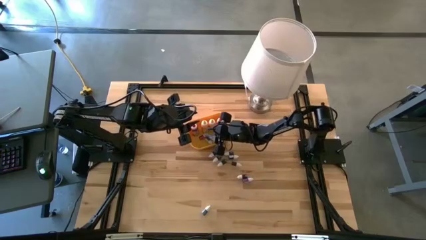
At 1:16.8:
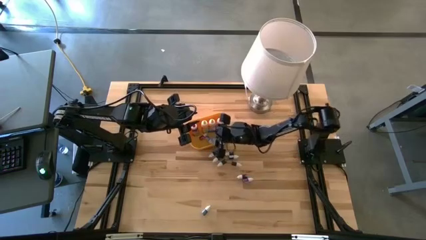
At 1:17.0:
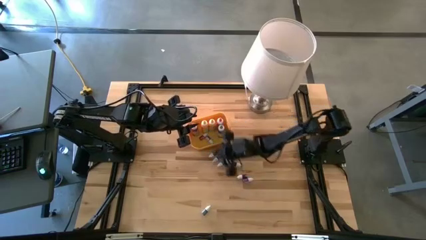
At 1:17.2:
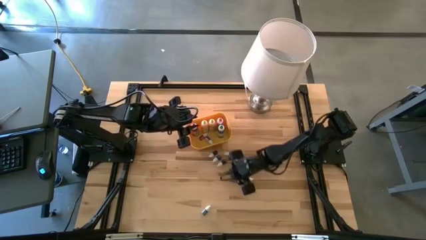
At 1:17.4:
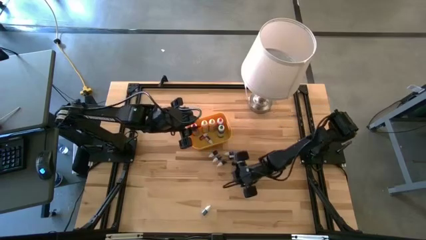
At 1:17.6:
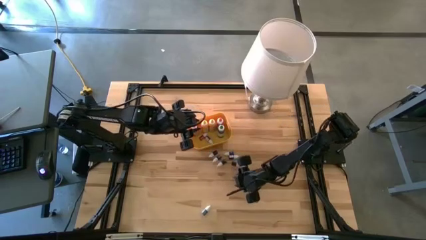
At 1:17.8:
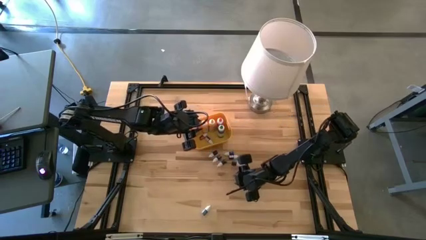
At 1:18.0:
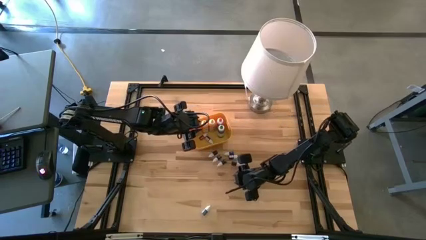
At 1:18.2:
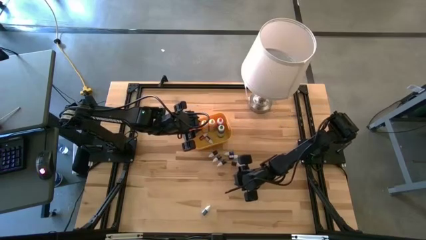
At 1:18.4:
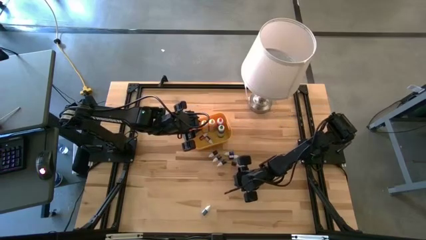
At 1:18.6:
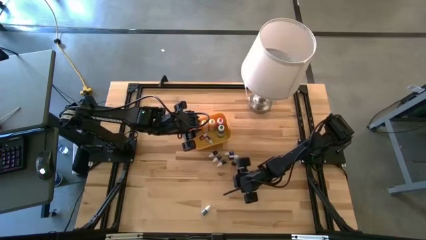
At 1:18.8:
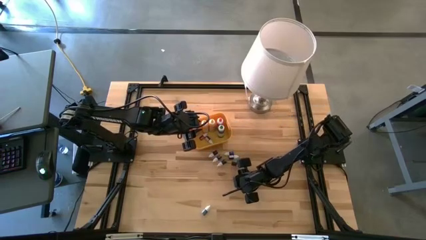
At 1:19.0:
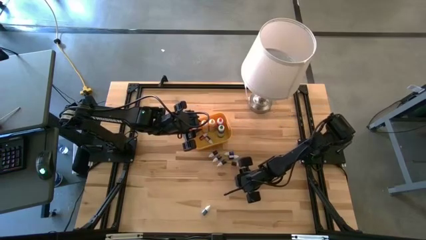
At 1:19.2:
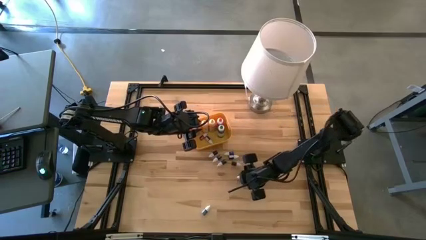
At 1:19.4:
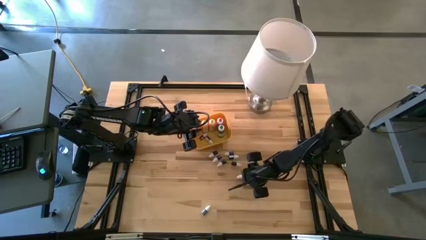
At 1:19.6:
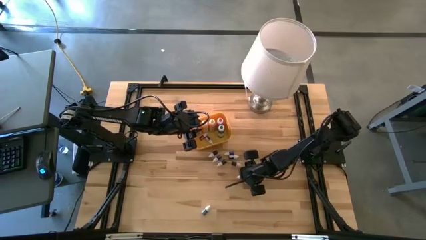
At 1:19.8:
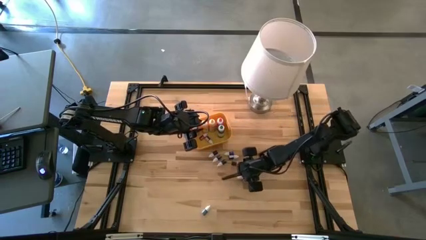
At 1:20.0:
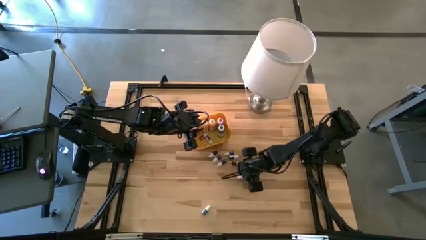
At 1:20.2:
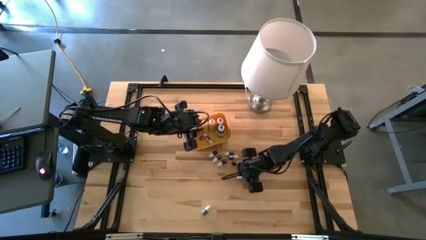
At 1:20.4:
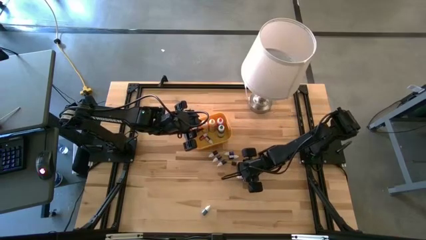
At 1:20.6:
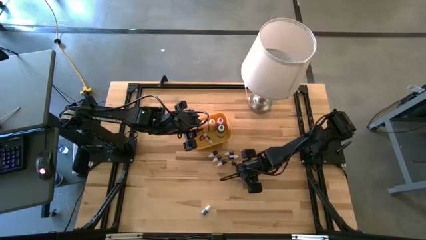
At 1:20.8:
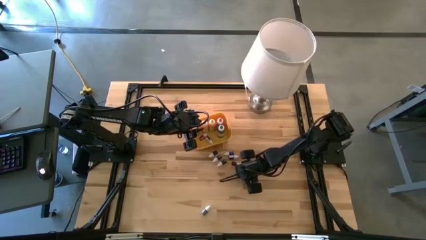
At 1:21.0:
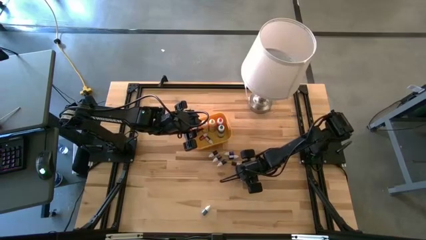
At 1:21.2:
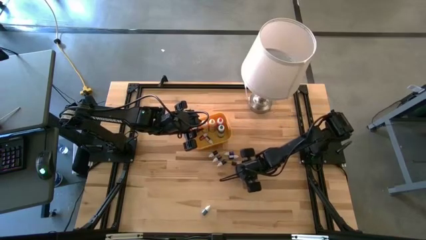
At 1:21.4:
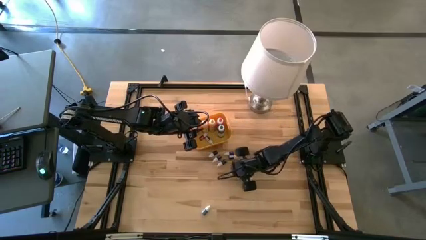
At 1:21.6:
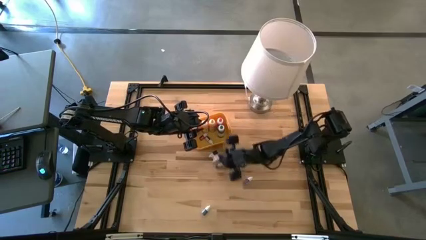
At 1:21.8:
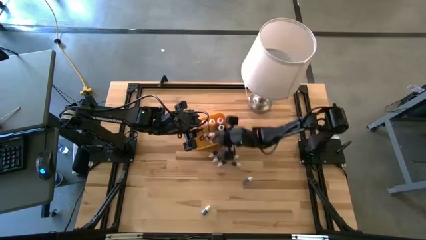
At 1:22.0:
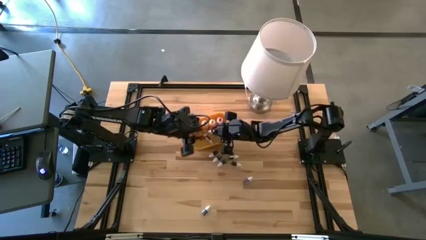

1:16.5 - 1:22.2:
Task: Pick & Place food coloring
Put the small red food coloring bottle into the yellow bin

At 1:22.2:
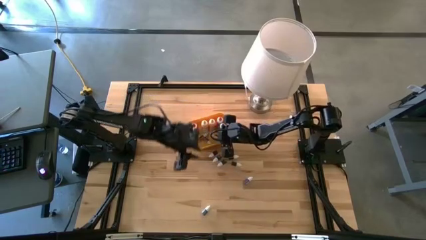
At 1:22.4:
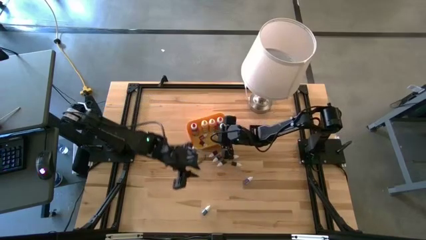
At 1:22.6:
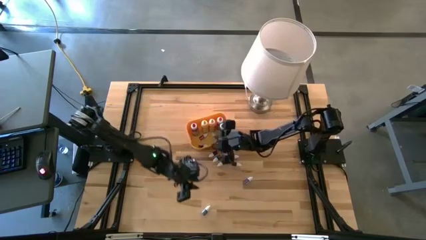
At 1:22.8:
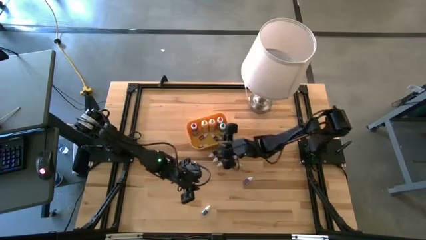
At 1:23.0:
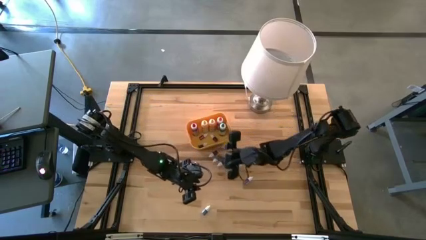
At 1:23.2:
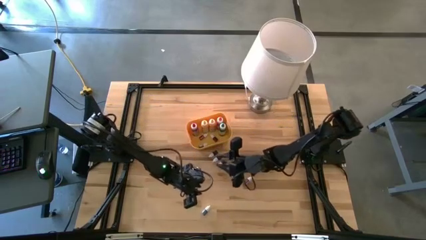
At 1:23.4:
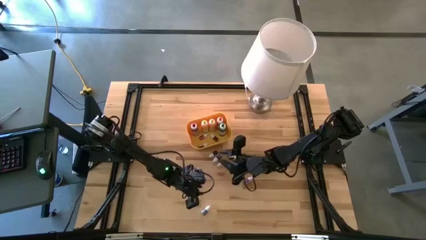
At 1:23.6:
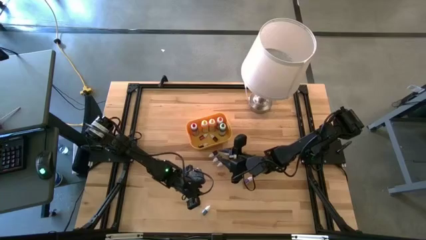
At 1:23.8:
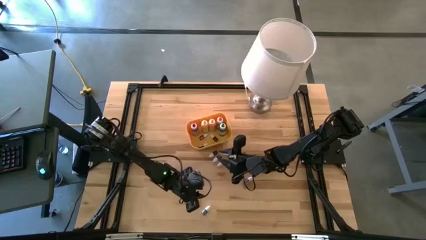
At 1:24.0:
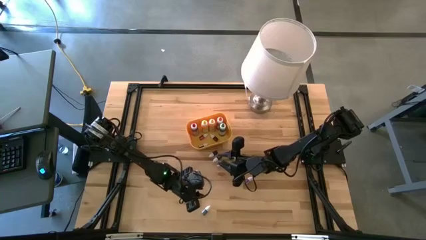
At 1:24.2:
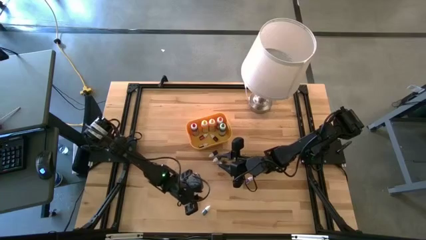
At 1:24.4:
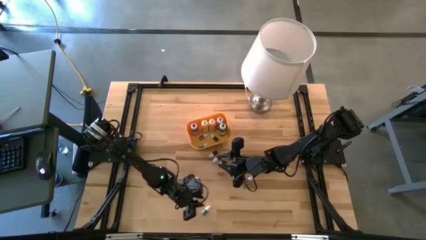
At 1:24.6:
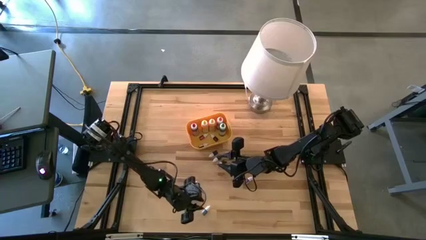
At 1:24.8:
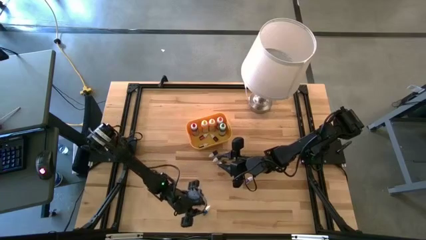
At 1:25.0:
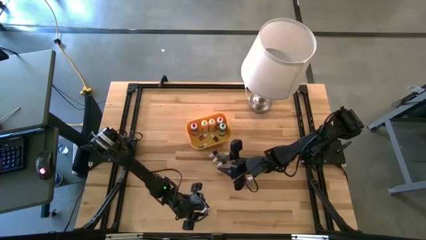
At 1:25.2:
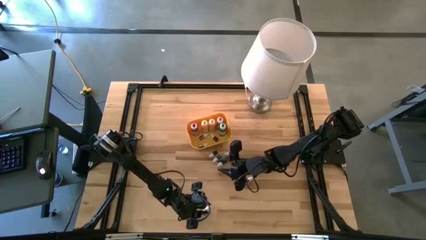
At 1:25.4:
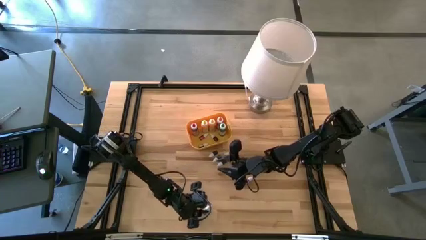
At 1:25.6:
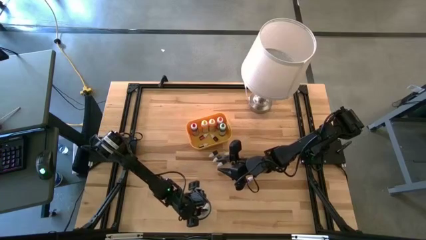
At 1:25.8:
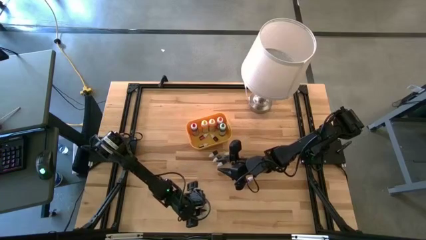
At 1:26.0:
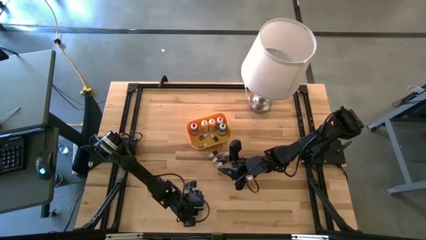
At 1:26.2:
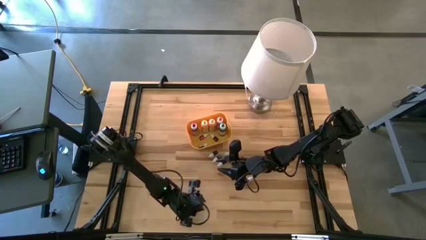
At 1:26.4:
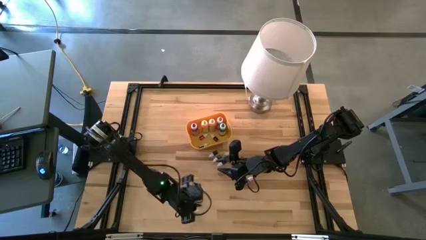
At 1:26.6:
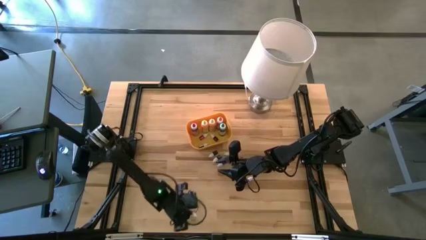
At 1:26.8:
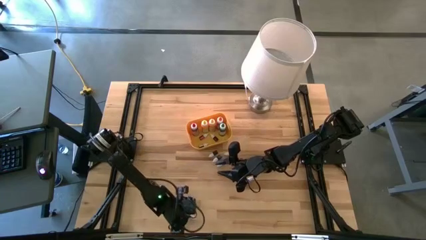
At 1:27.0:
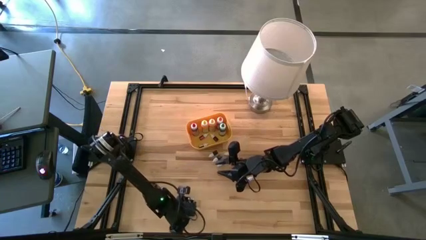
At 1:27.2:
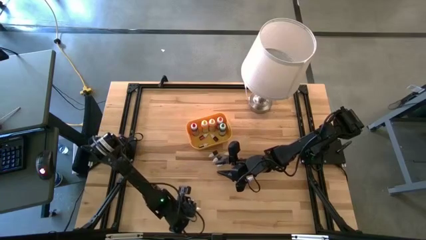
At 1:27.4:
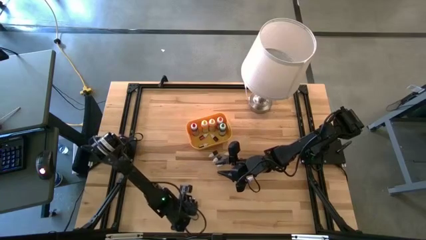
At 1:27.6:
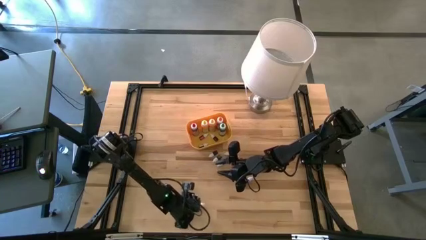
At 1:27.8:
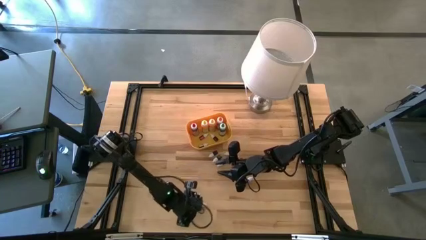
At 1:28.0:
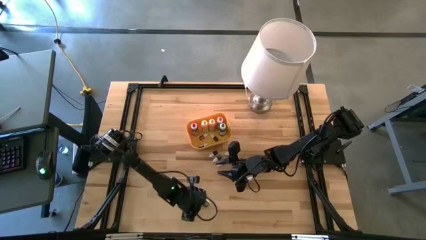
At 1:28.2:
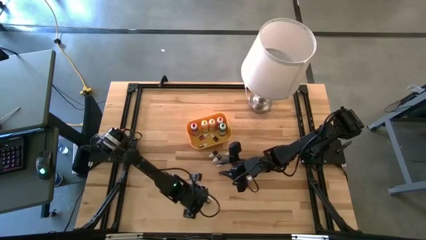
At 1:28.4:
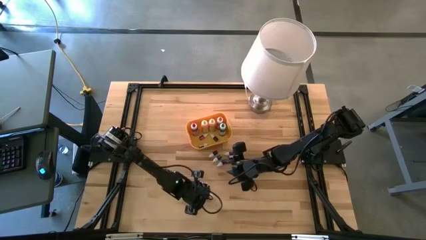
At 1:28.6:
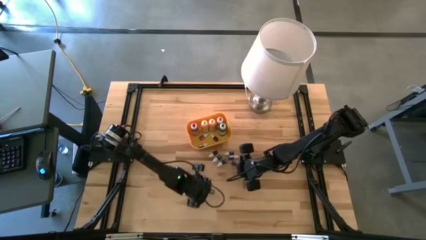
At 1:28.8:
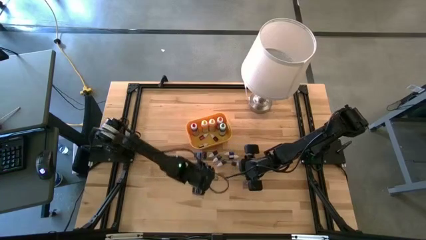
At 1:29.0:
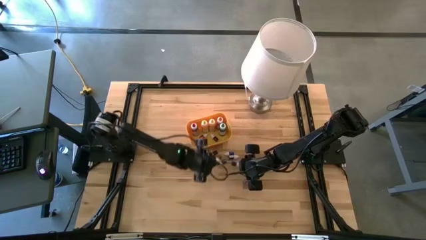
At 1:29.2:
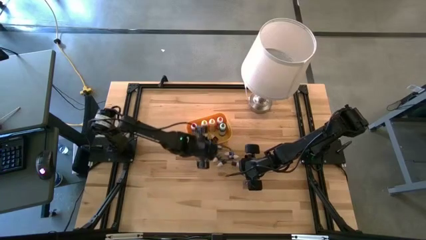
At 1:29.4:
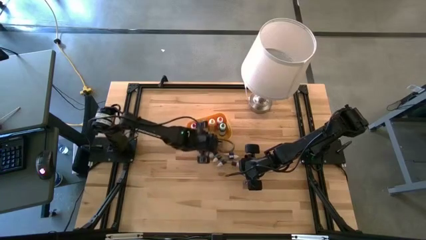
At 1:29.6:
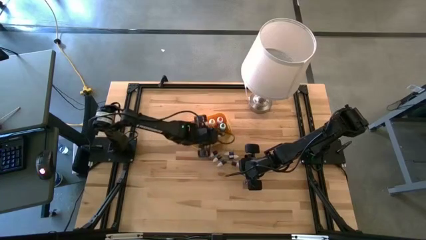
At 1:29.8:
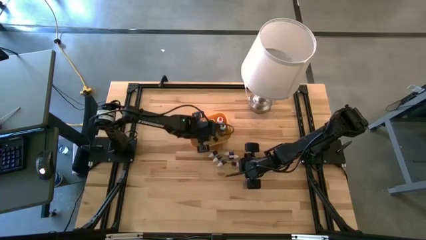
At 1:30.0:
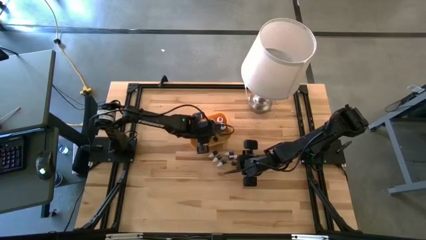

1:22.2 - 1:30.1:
Put the small green food coloring bottle into the yellow bin

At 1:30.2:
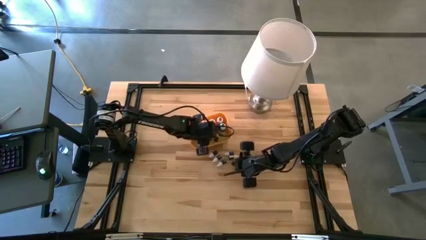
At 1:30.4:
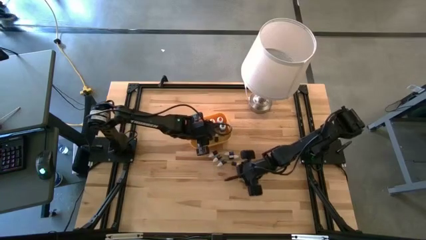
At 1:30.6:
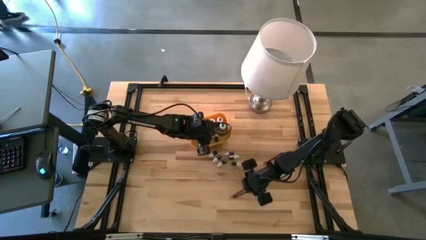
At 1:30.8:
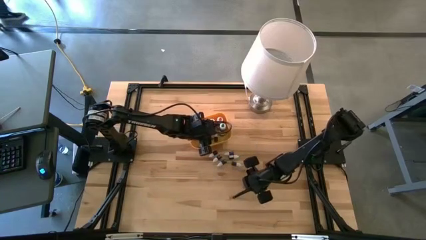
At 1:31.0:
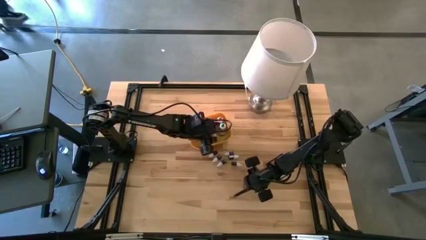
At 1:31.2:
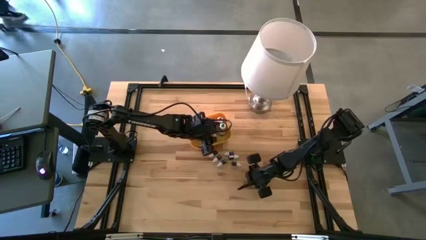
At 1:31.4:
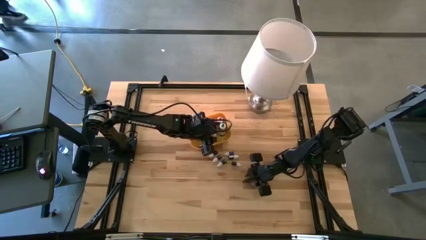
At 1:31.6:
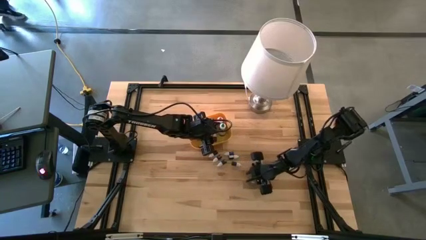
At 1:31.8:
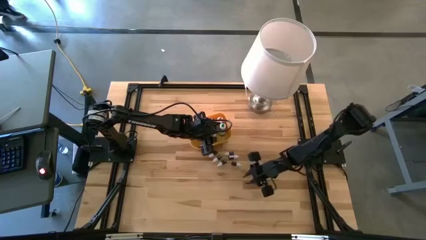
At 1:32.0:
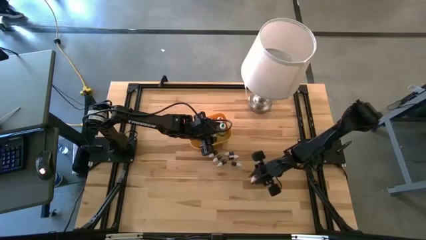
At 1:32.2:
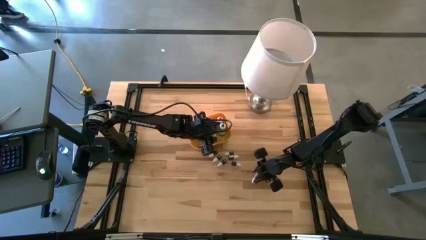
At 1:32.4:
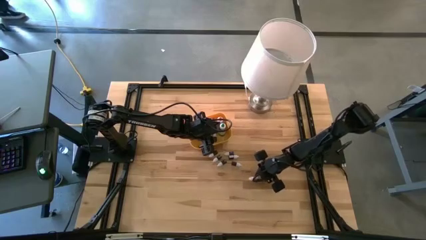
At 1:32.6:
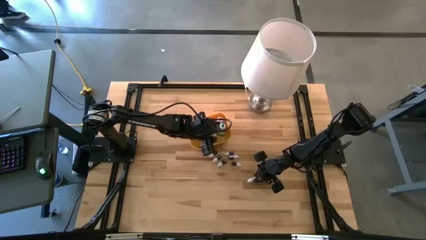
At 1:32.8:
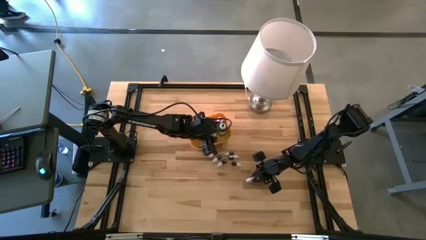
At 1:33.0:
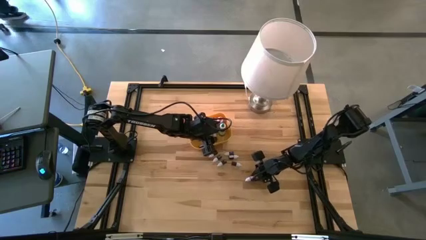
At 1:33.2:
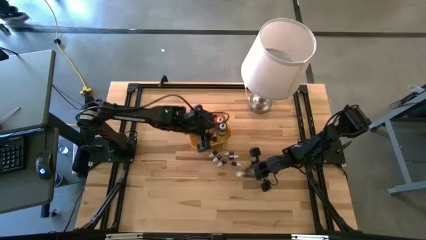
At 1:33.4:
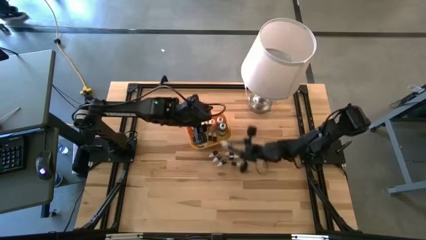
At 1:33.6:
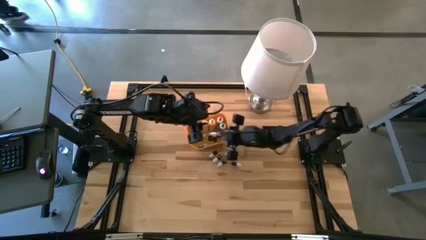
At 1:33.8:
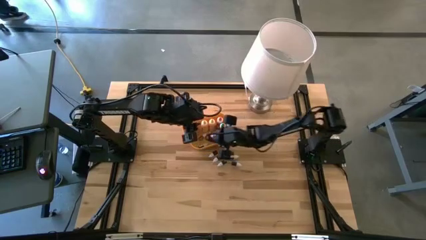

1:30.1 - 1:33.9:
Put the small purple food coloring bottle into the yellow bin
